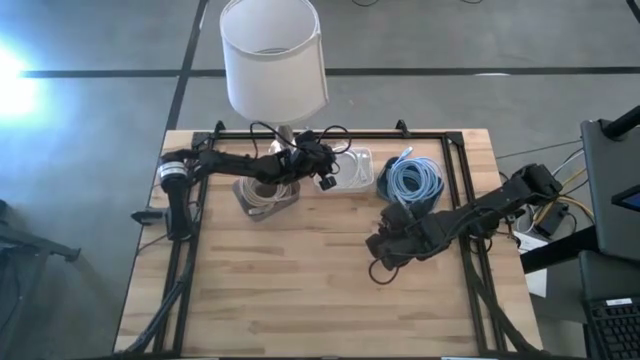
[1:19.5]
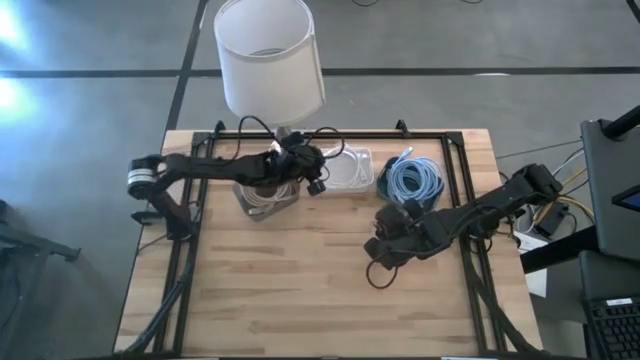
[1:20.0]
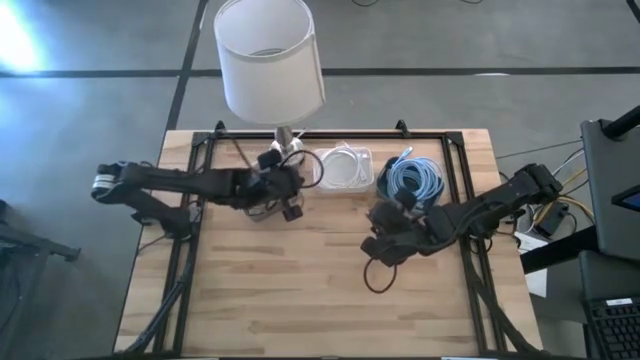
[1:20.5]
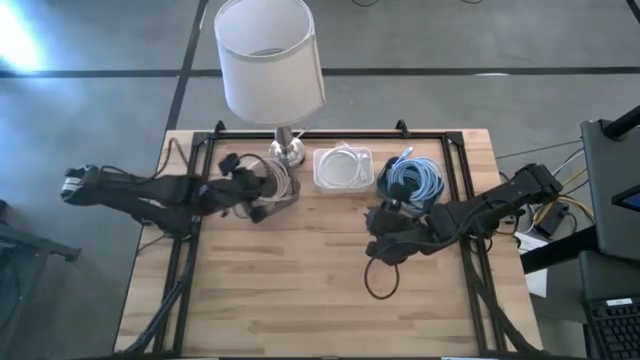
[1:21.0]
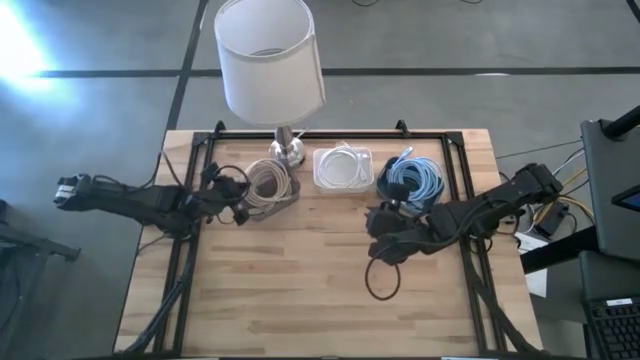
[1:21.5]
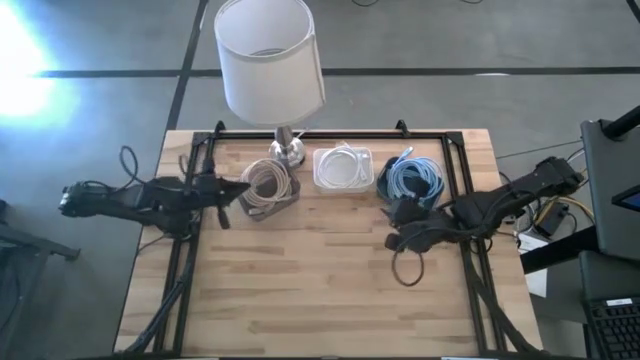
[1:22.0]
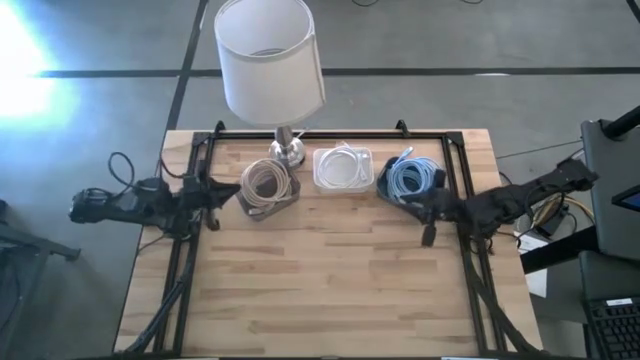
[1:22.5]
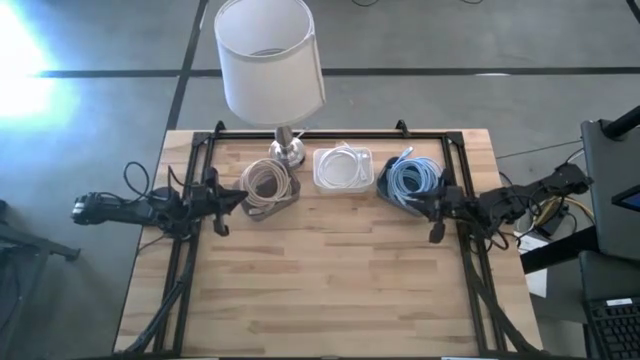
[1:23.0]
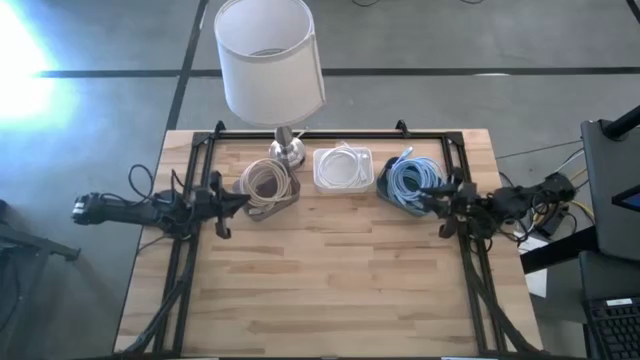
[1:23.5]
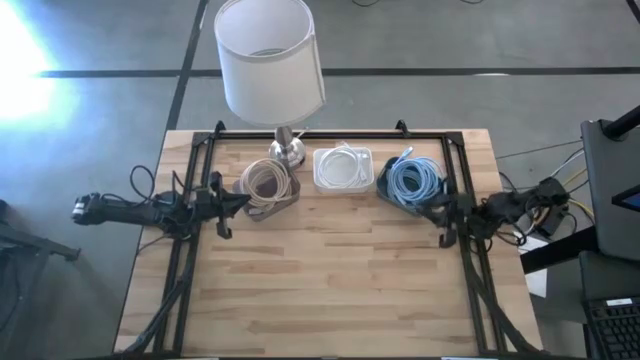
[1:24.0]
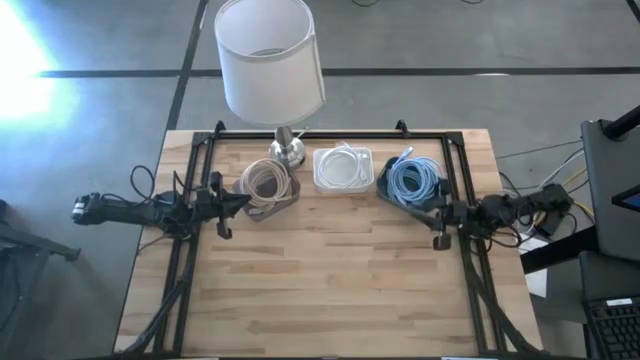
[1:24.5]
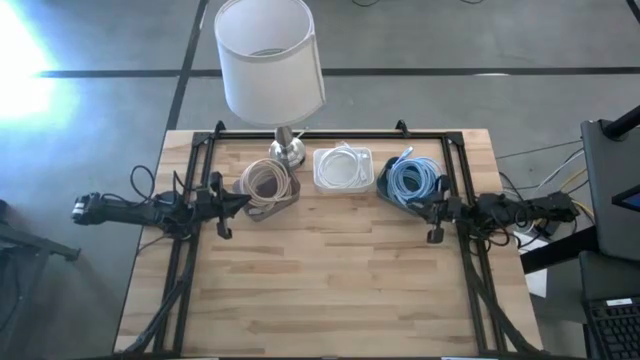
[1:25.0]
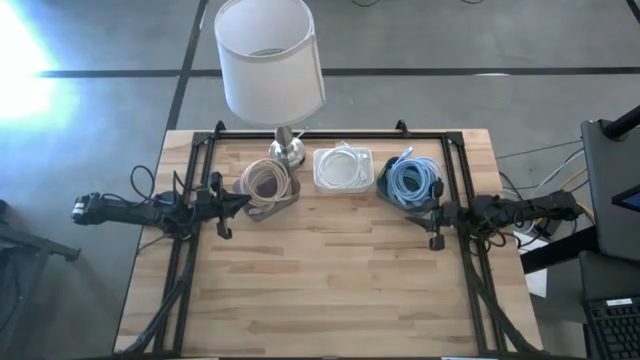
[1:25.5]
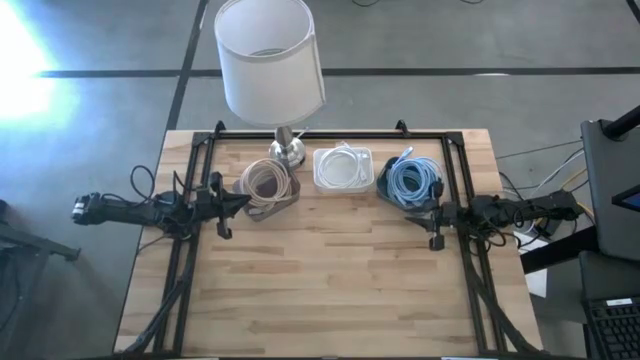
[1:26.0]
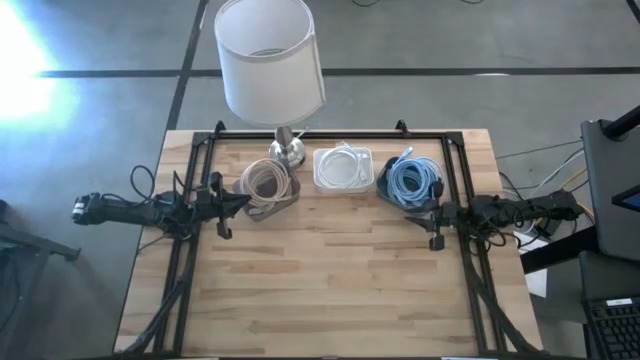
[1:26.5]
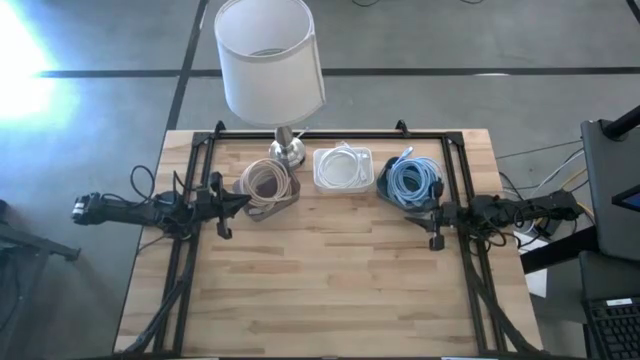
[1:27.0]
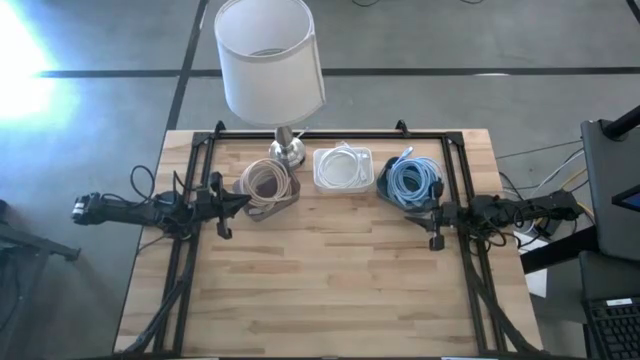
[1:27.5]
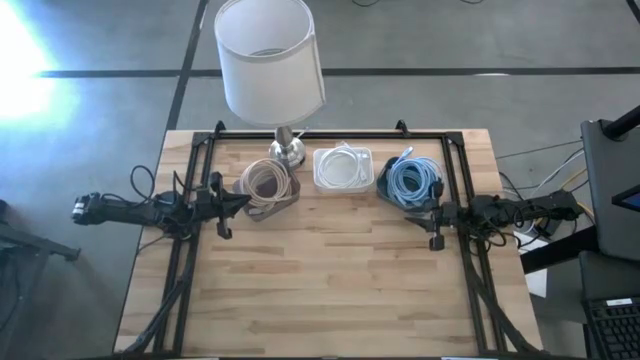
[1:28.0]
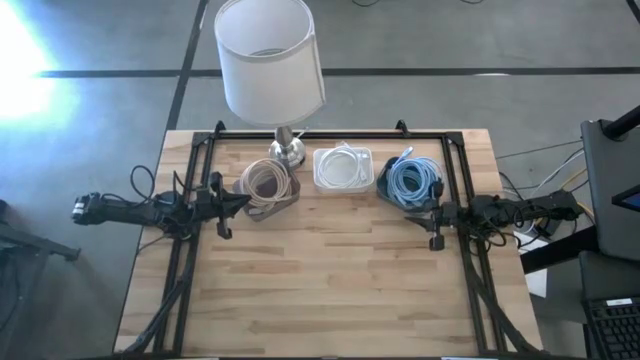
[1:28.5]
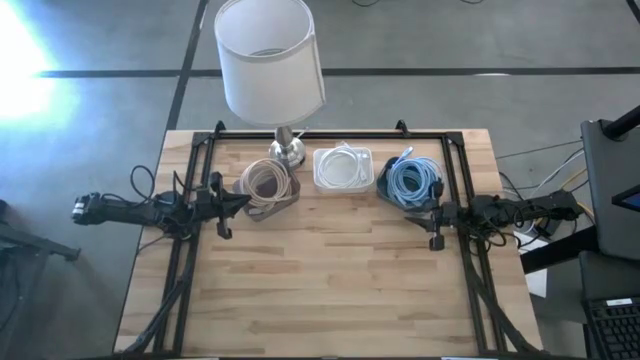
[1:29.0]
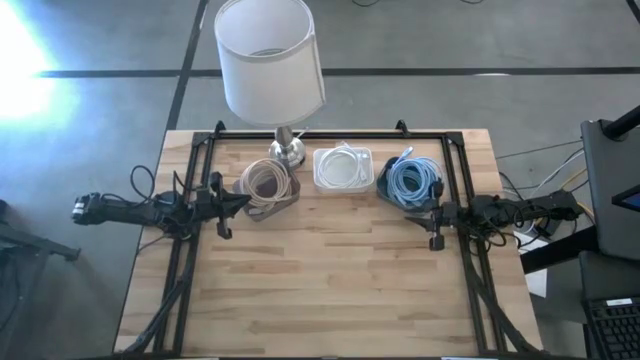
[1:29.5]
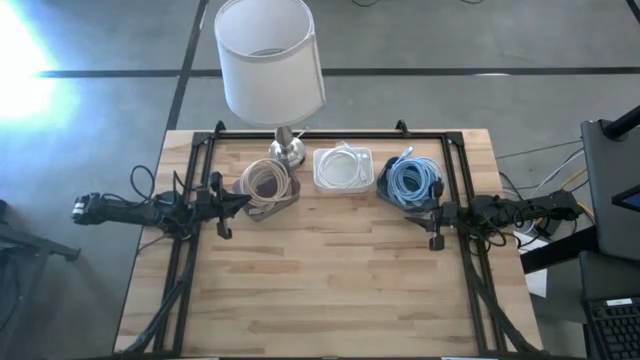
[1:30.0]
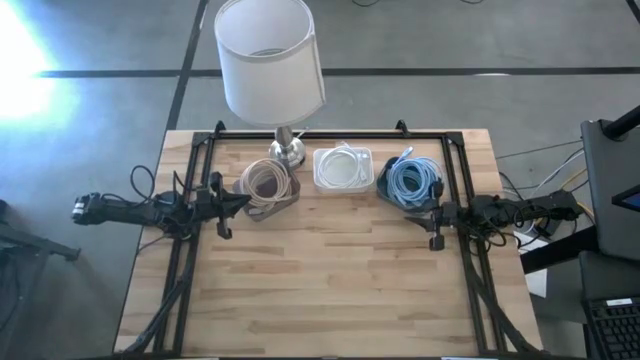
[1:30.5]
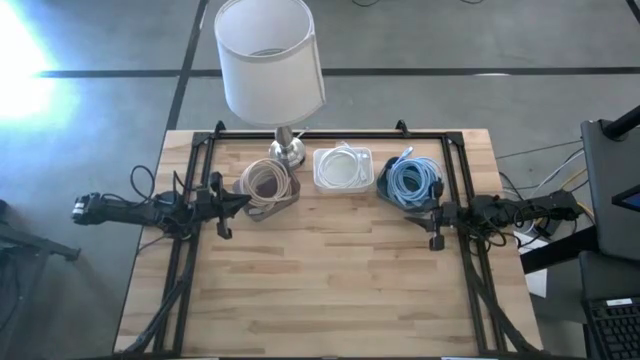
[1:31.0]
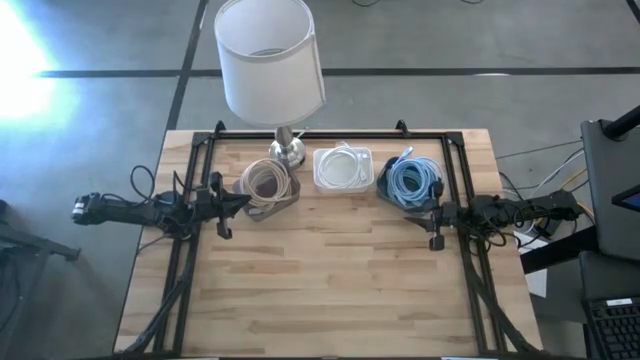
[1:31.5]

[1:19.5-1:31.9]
Task: Sort HDMI cables
Return to Home Position

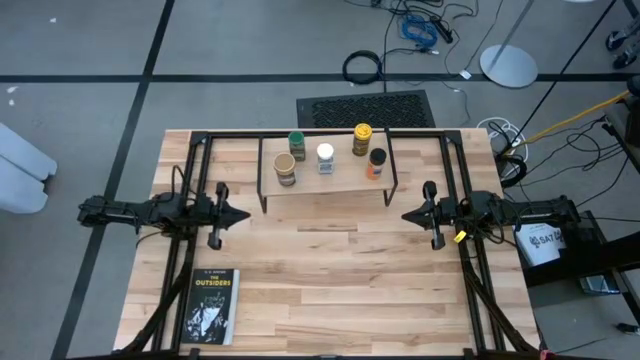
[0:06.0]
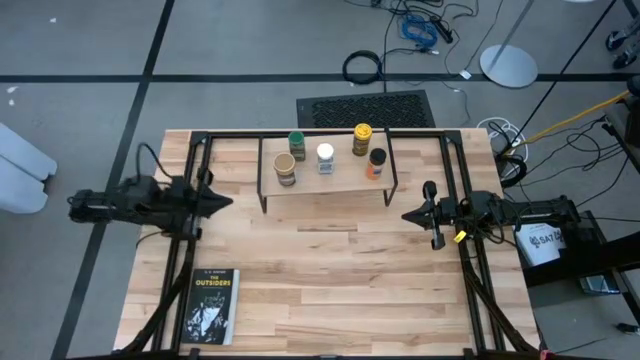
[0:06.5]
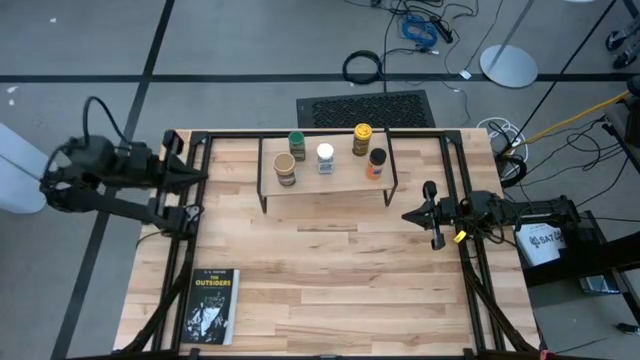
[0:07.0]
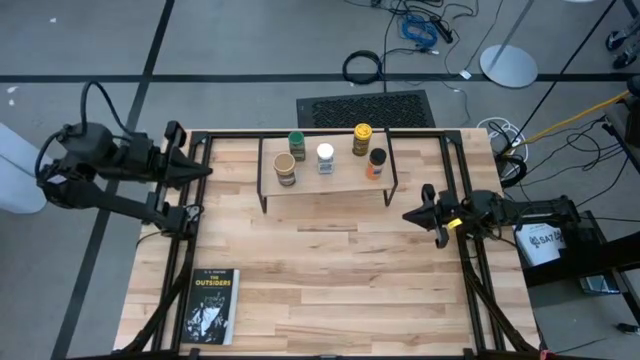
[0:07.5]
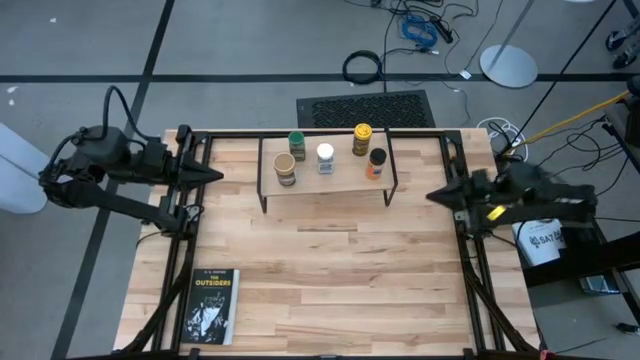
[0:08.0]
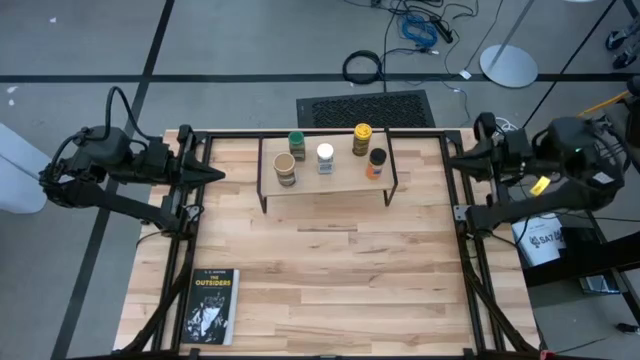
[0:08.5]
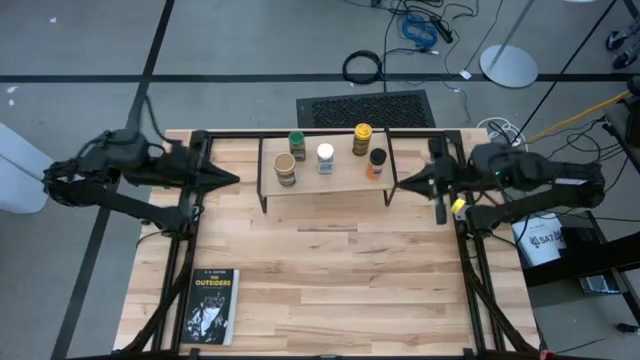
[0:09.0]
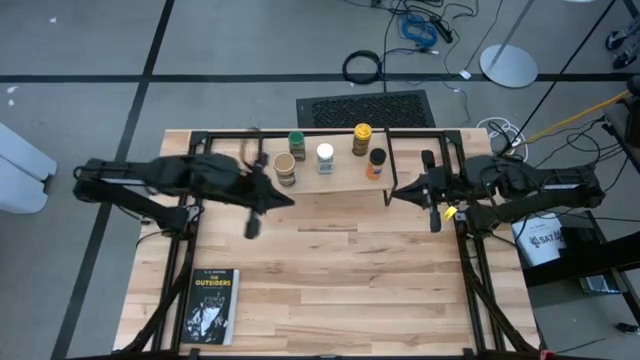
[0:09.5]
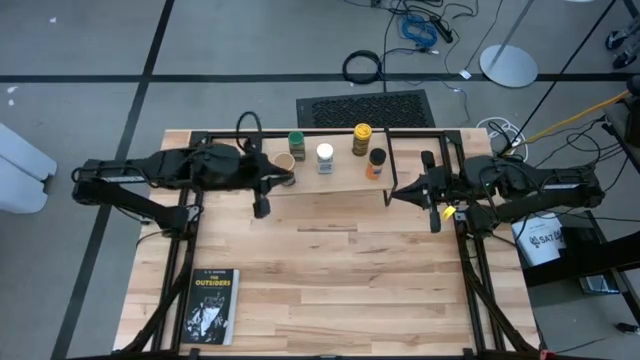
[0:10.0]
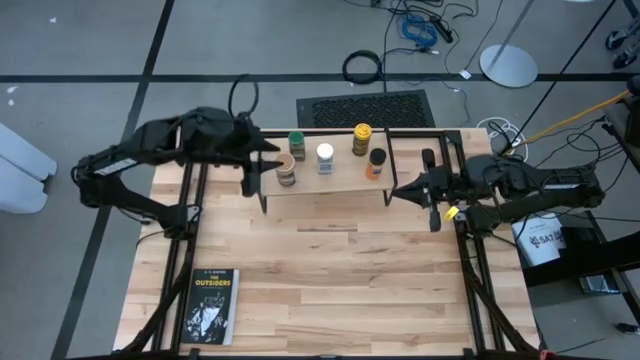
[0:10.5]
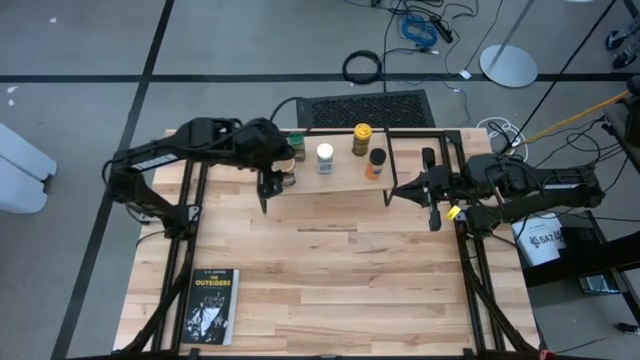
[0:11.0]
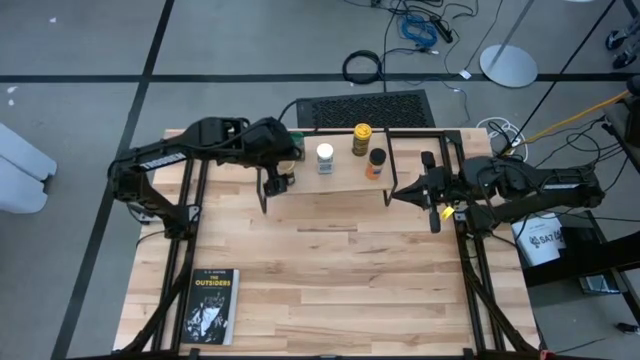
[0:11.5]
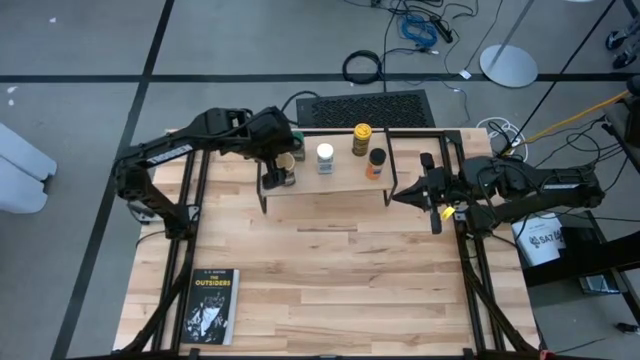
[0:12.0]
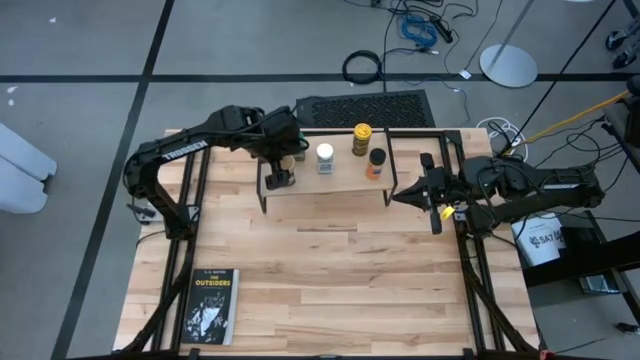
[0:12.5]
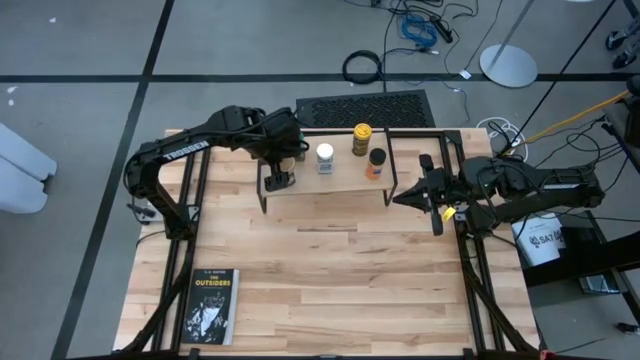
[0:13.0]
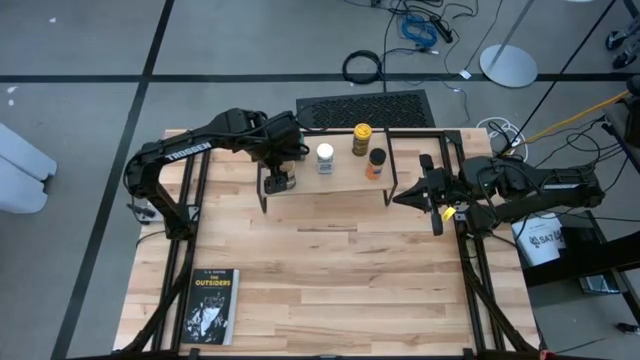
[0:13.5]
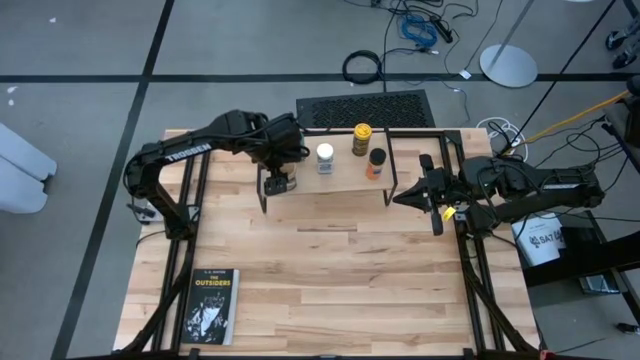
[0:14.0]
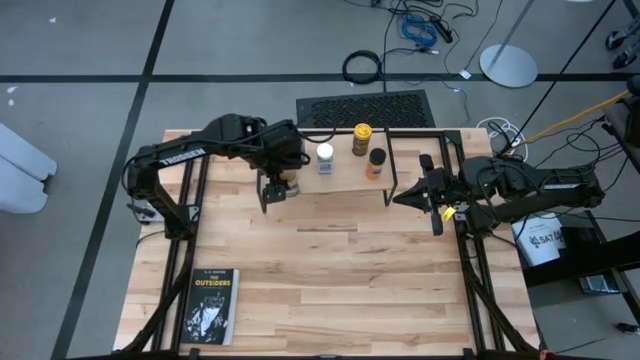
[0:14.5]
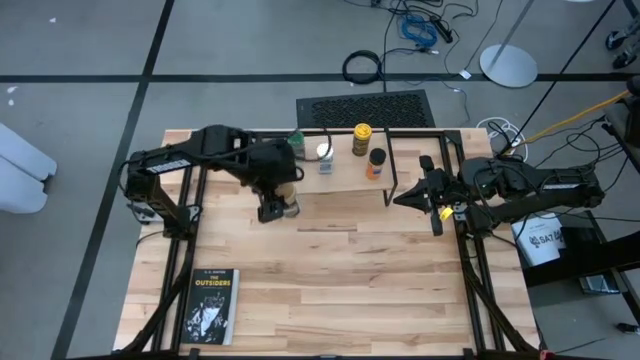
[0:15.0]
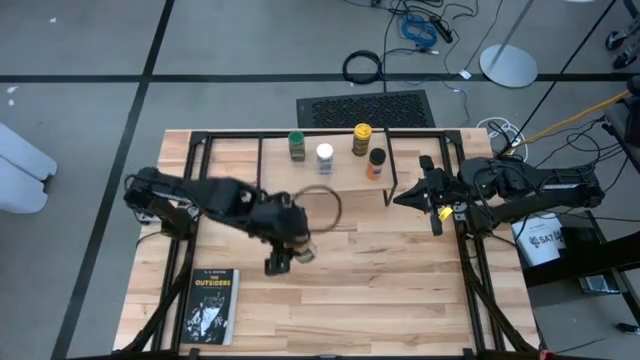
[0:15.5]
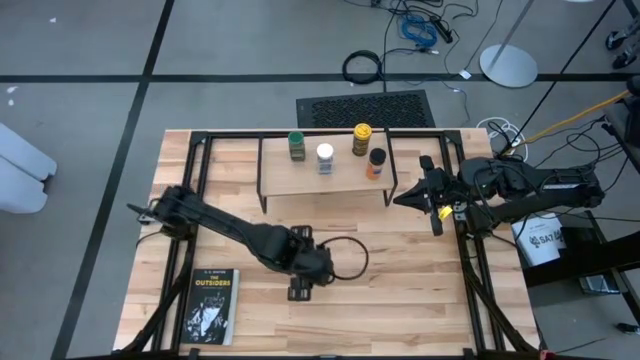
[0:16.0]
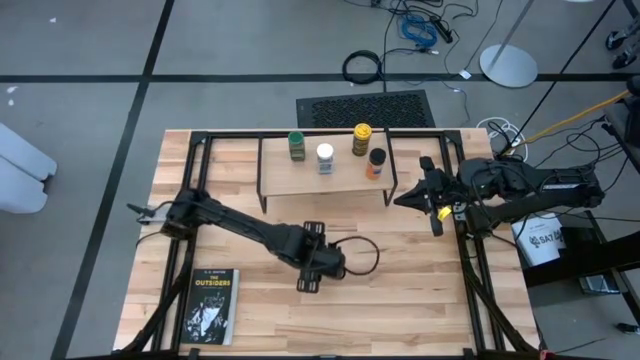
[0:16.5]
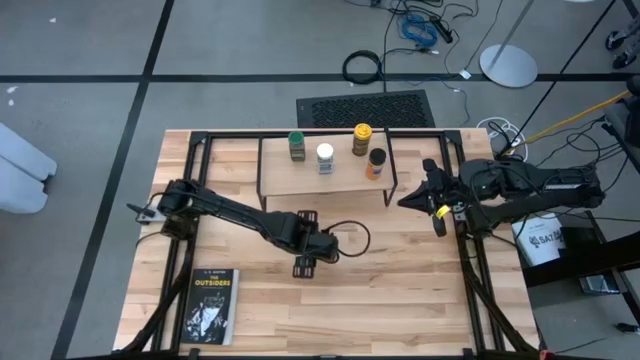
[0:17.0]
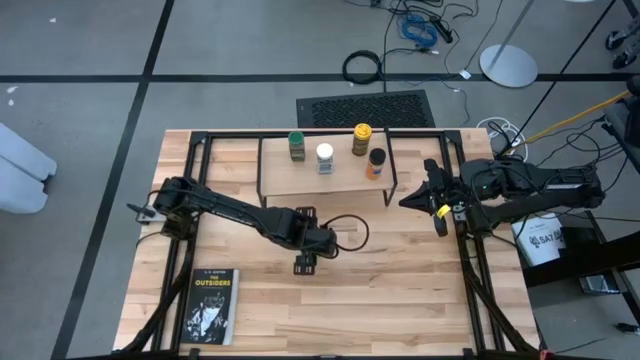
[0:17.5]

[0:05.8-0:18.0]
Task: Shelf spices
Remove the brown seasoning bottle from the shelf
